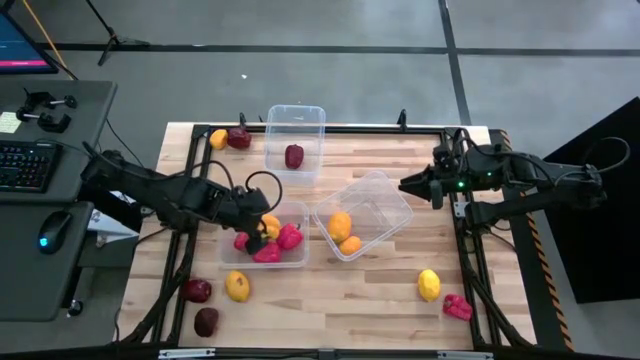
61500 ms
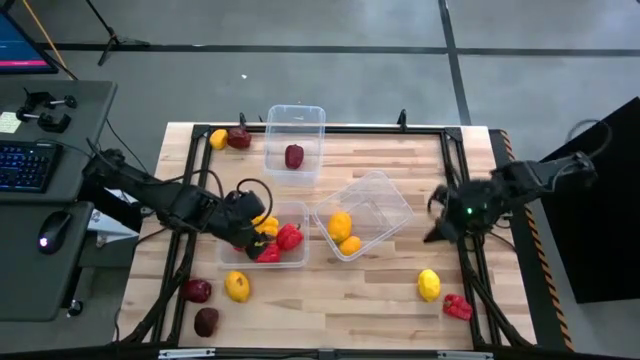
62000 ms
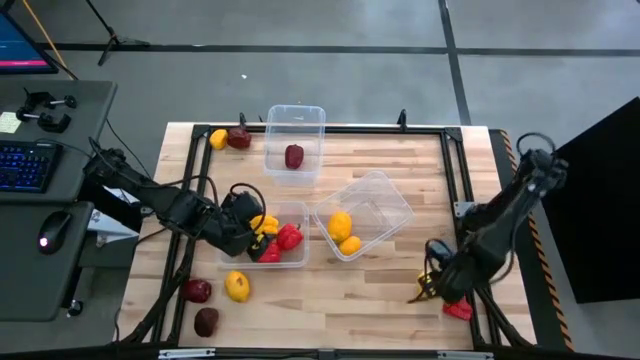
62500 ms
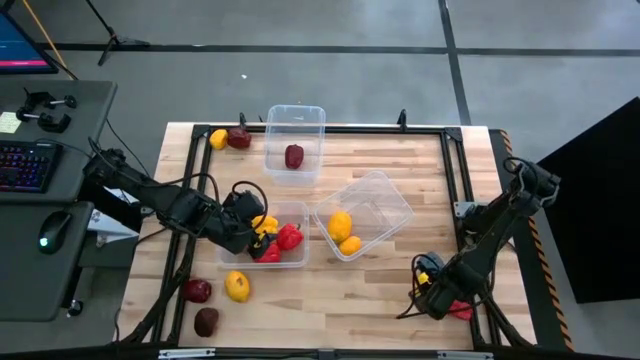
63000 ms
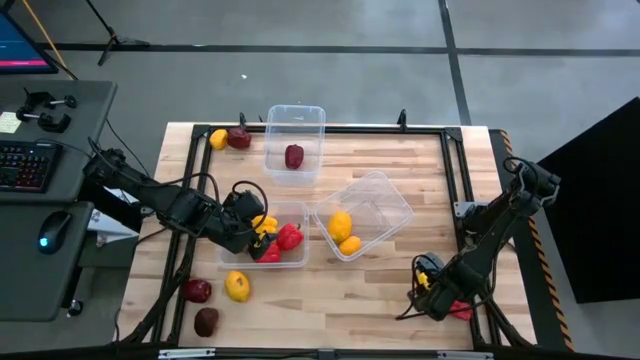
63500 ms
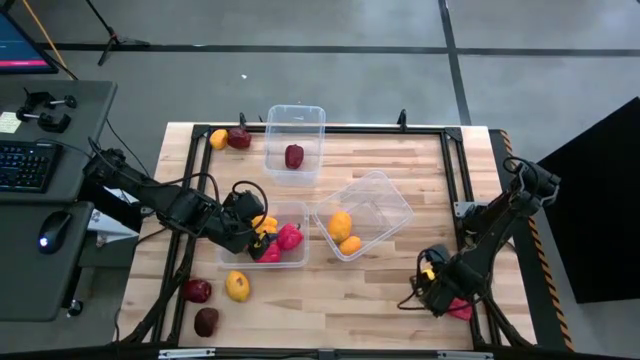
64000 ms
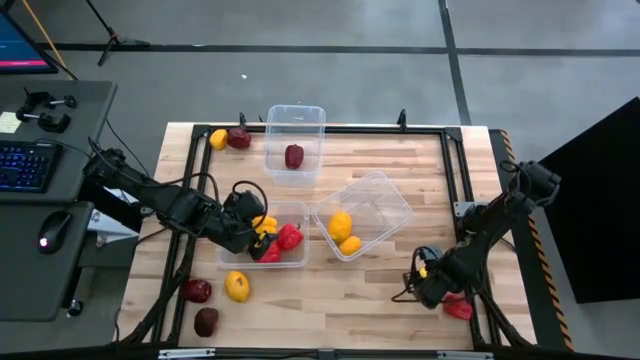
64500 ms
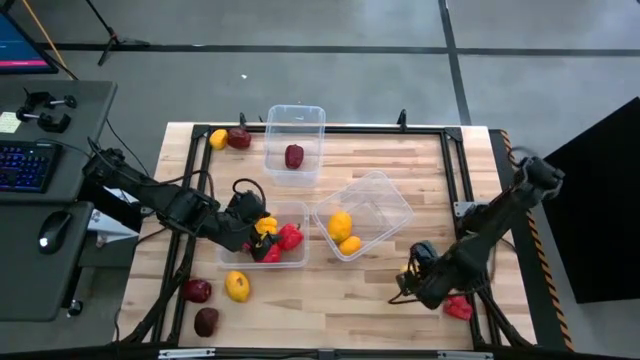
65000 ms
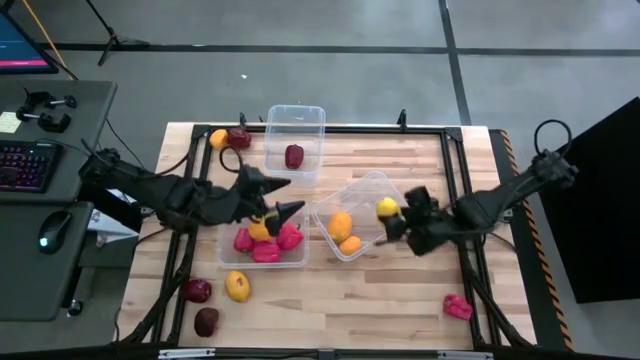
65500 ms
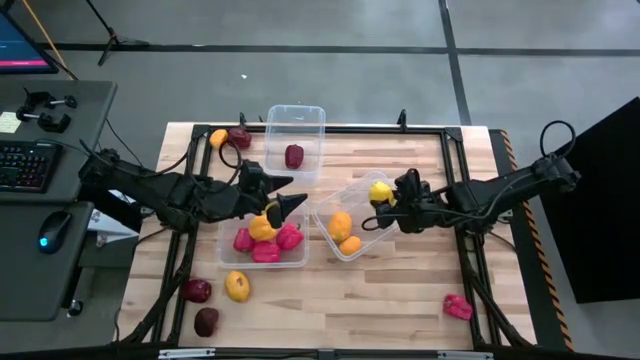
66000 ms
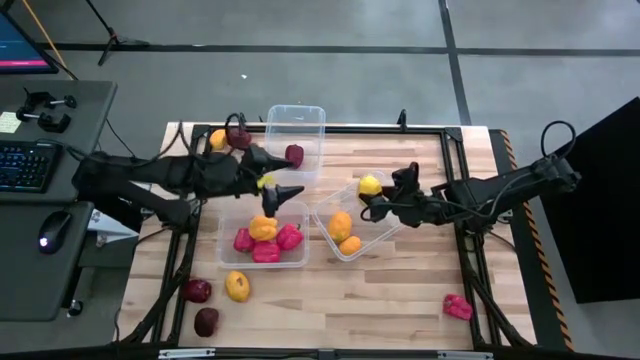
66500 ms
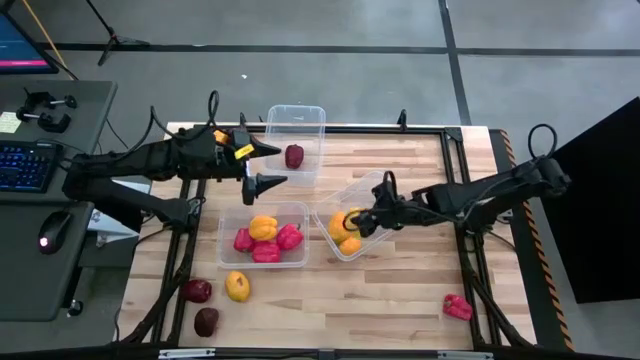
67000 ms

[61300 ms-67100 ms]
Task: Sort produce into baskets
Put the bottom right lemon into the middle right transparent bin

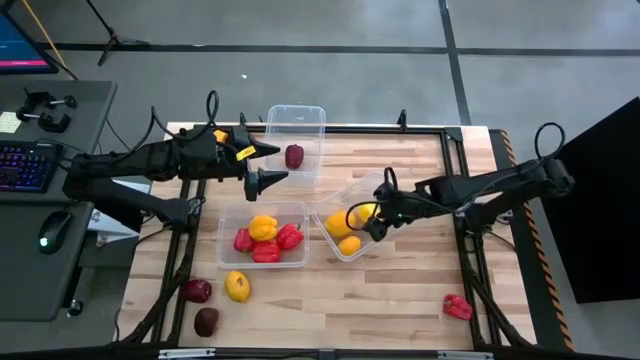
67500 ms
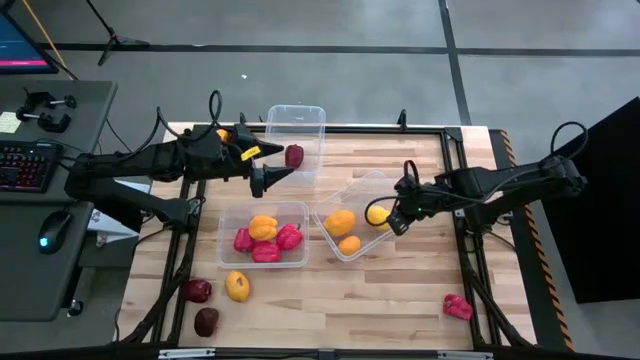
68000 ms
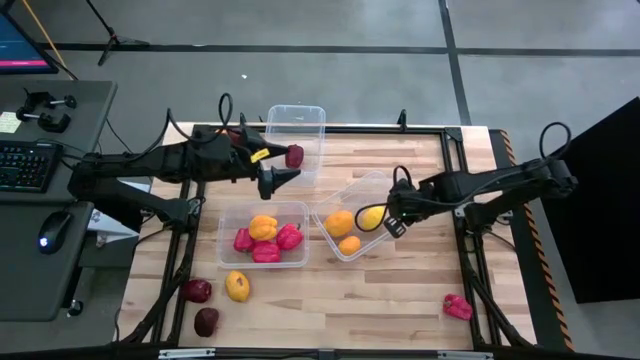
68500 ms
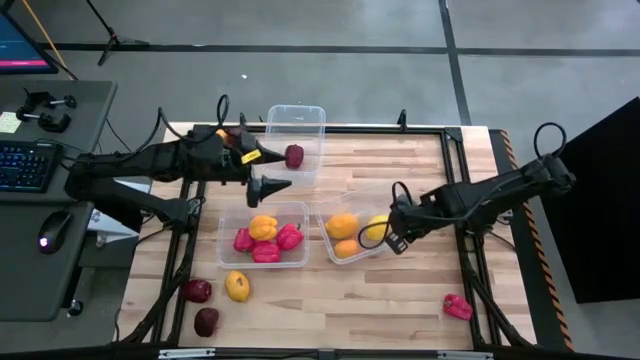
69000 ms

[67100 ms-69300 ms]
Adjust the middle right transparent bin

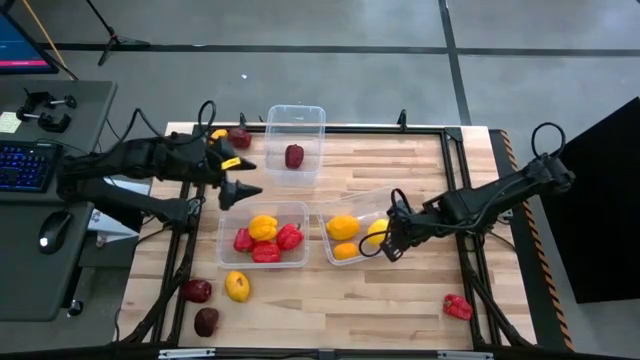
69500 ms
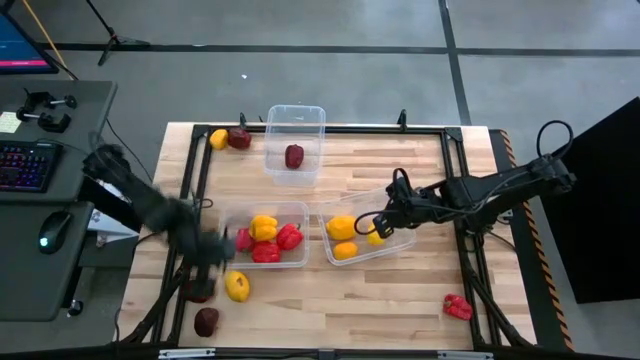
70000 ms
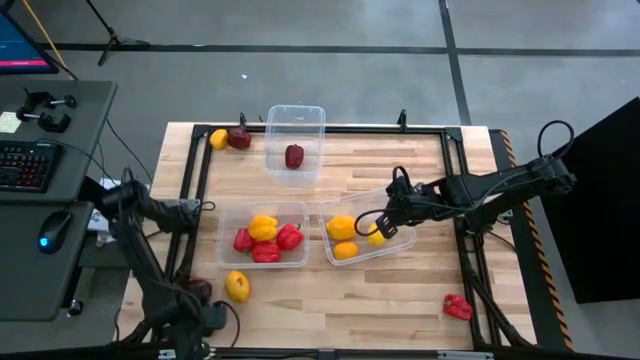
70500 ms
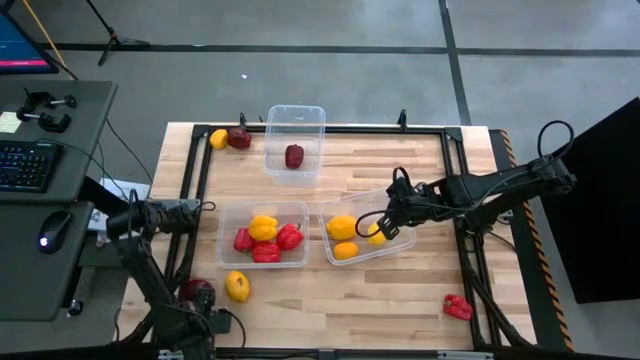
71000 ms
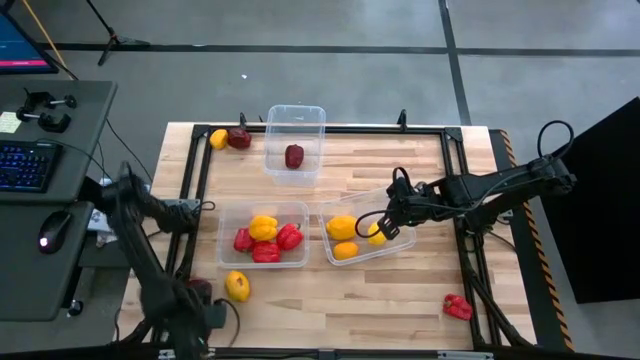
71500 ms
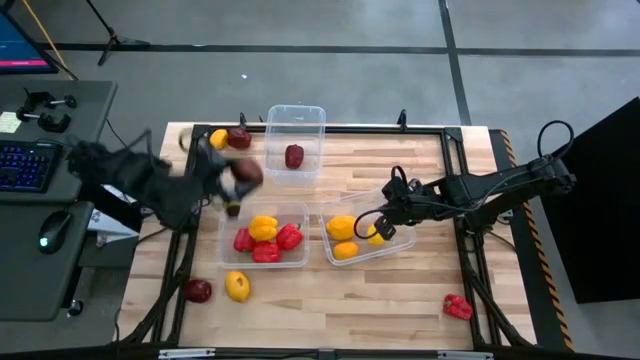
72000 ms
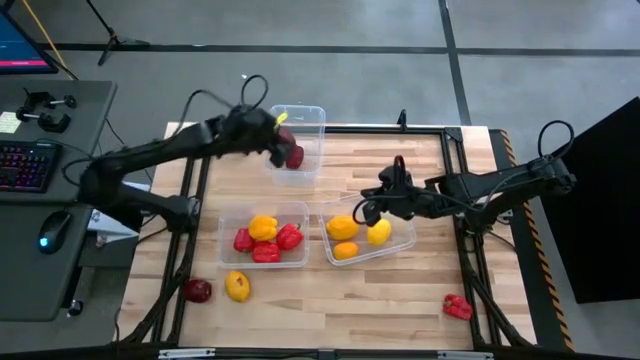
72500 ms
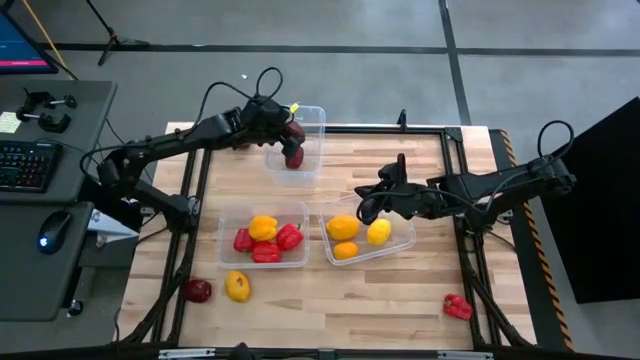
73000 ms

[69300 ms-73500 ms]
Put the bottom left red apple into the top center transparent bin

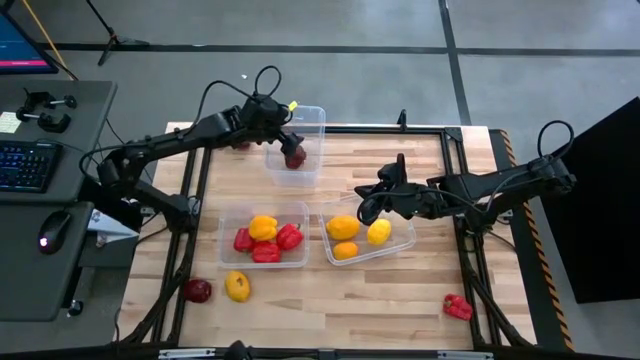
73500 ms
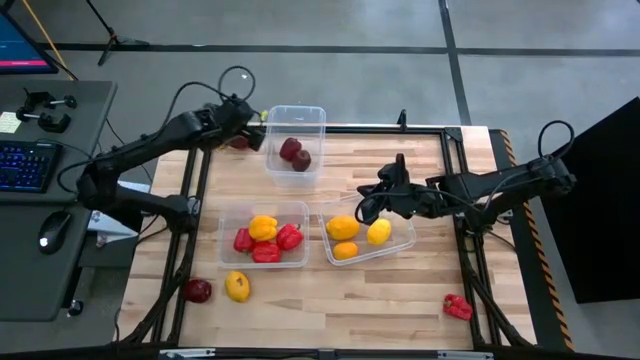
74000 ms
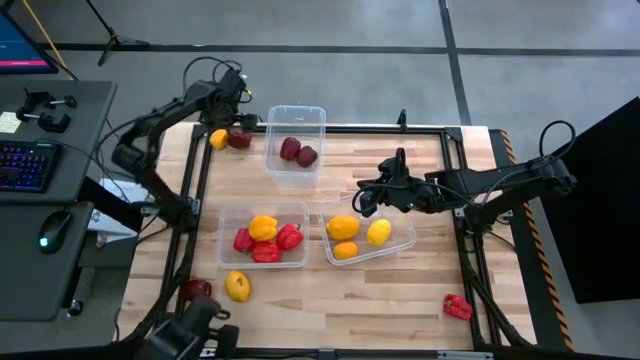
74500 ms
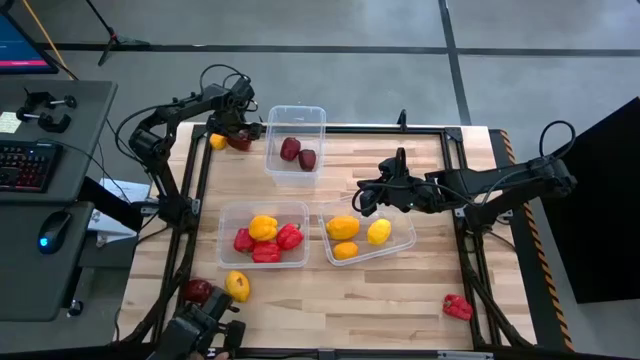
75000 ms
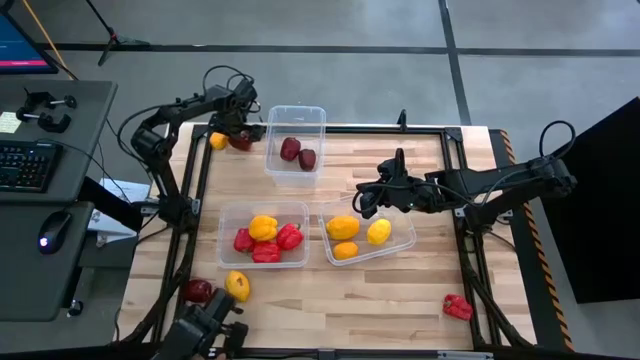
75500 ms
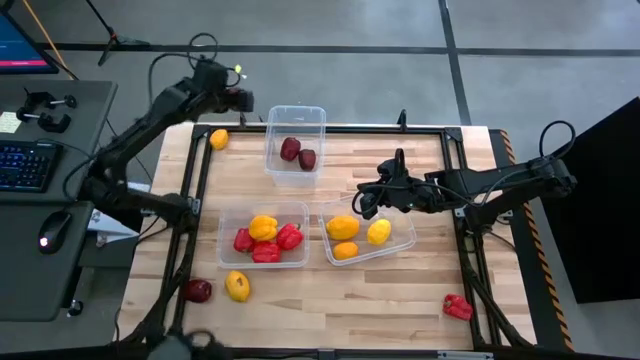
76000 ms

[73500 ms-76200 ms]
Put the top red apple into the top center transparent bin

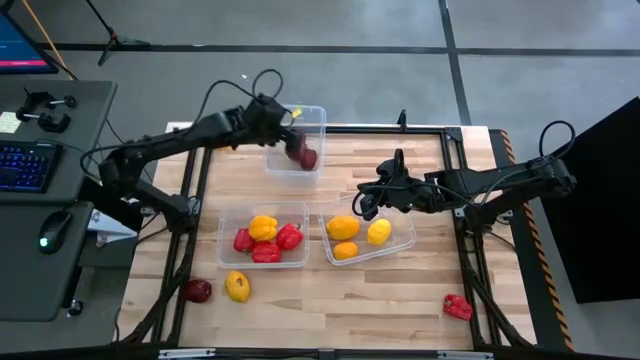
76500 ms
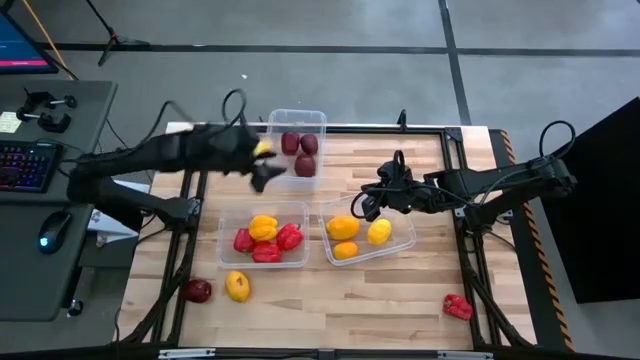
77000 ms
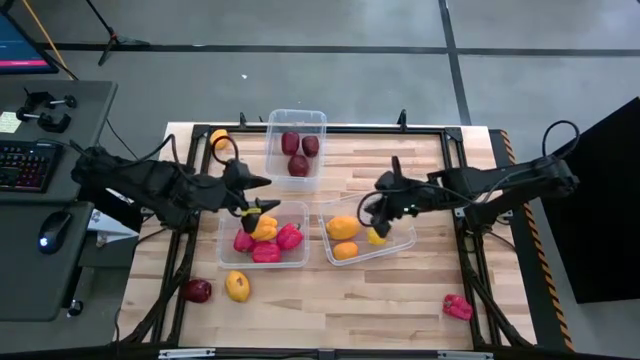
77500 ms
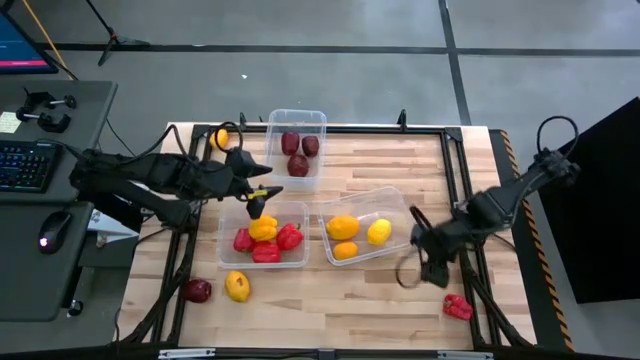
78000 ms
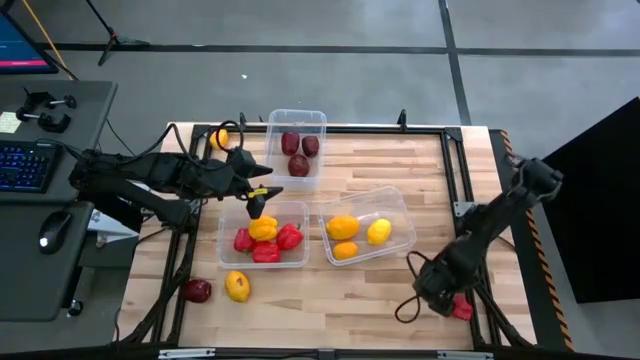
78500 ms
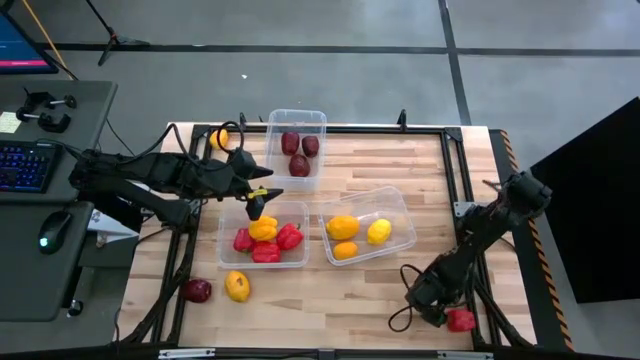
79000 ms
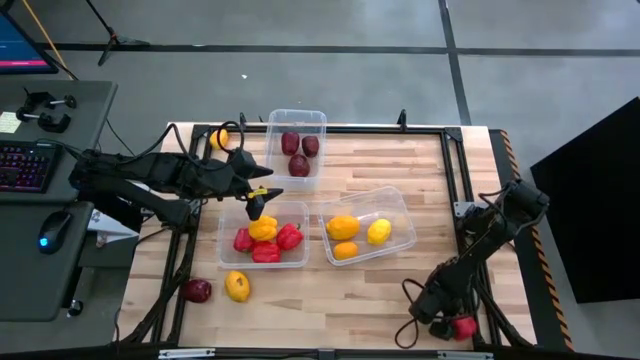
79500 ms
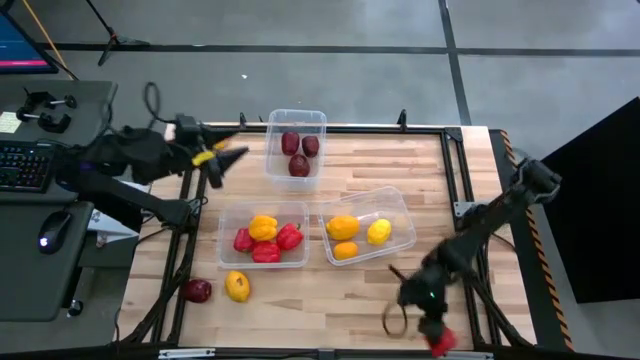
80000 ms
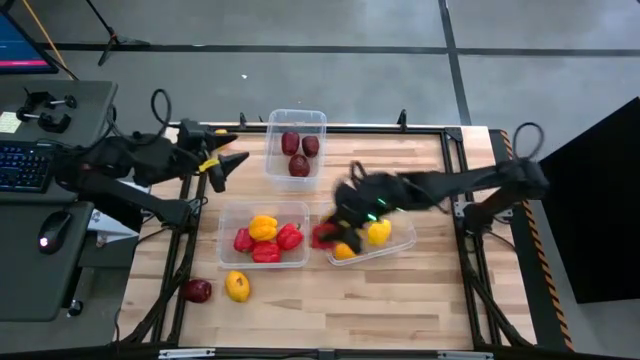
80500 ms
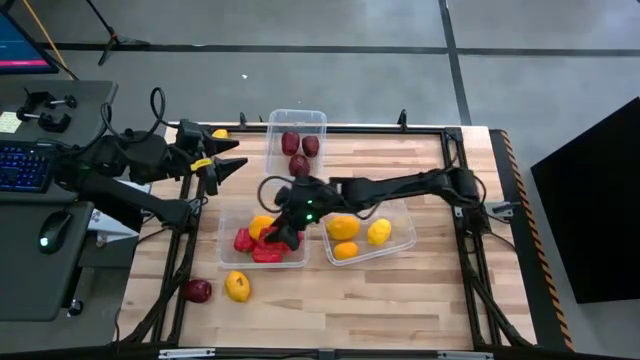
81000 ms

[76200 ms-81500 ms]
Put the red bell pepper into the middle left transparent bin

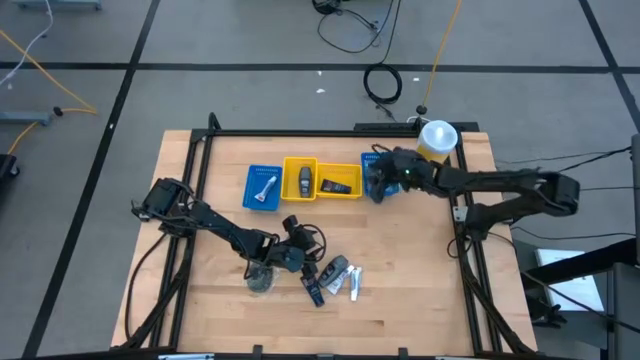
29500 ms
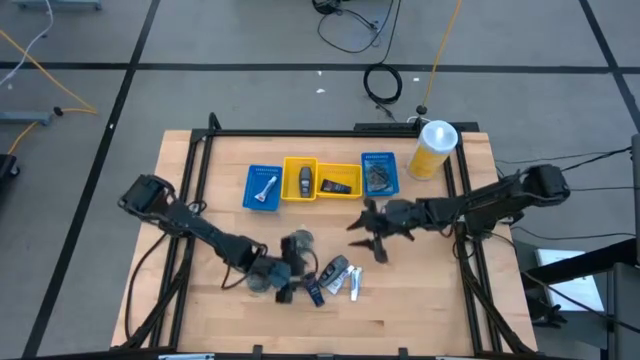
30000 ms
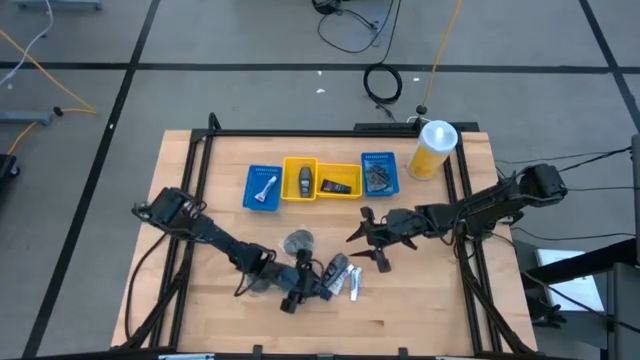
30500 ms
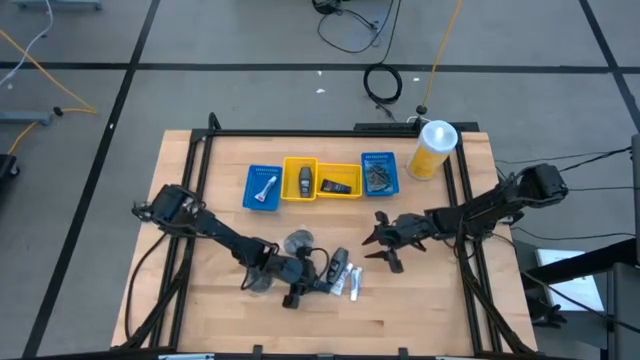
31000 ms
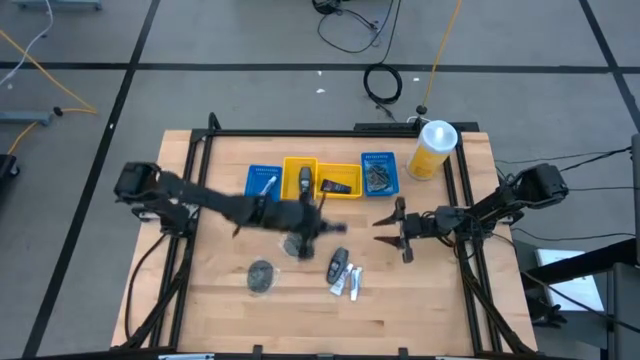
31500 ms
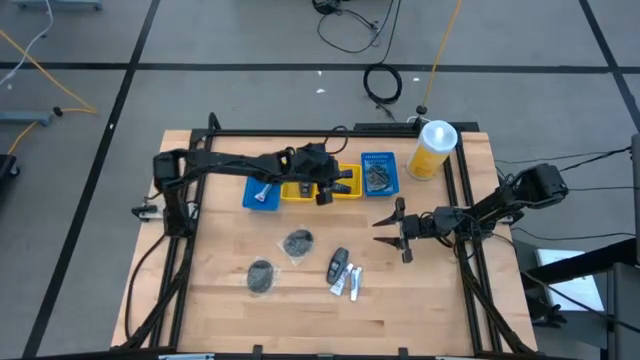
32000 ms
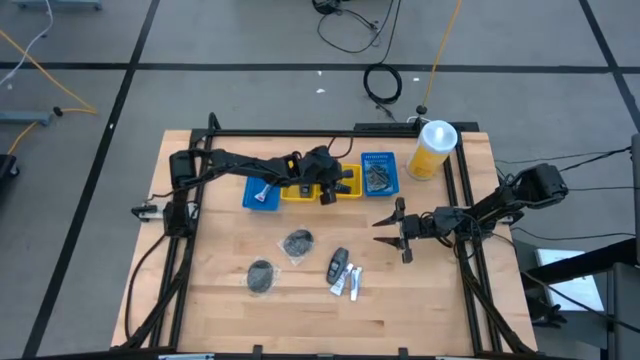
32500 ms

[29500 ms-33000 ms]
Task: Pick & Place Travel size toiletries
Put the shaving cream into the right yellow basket
